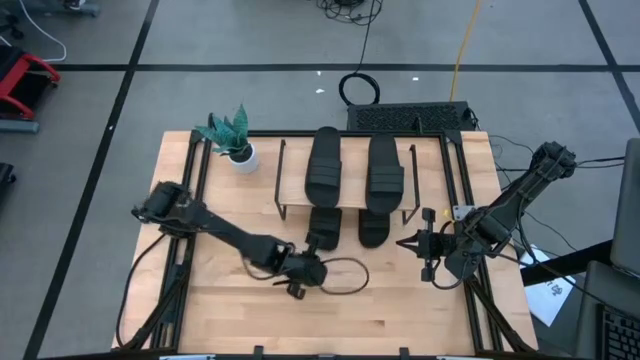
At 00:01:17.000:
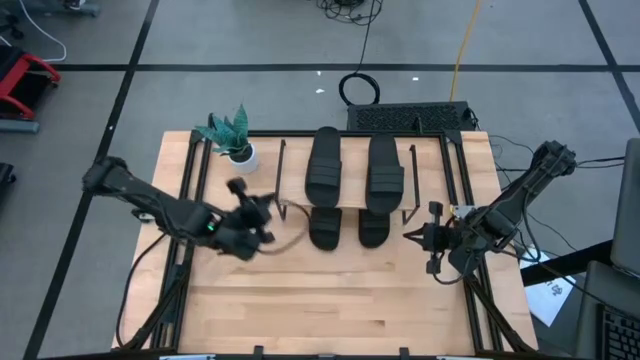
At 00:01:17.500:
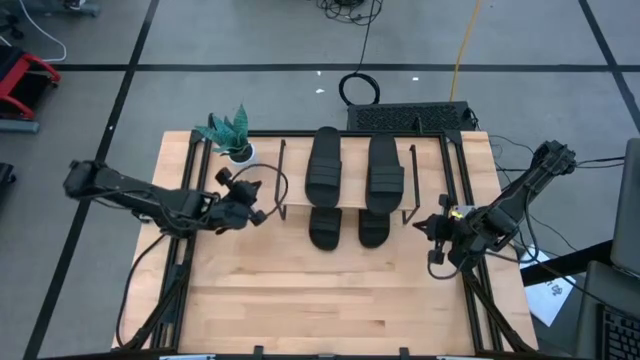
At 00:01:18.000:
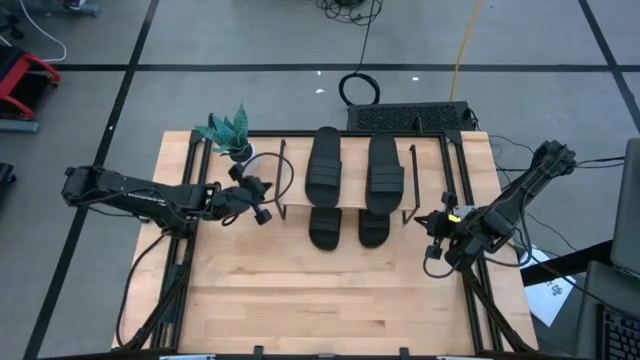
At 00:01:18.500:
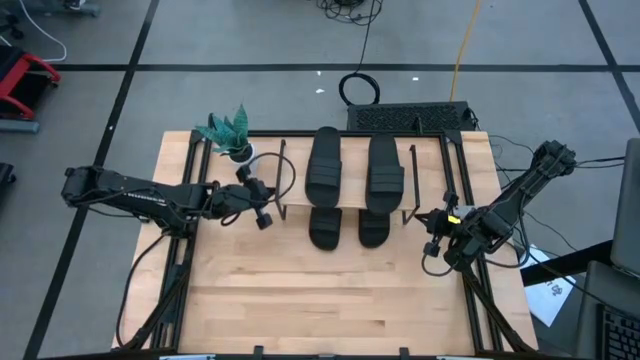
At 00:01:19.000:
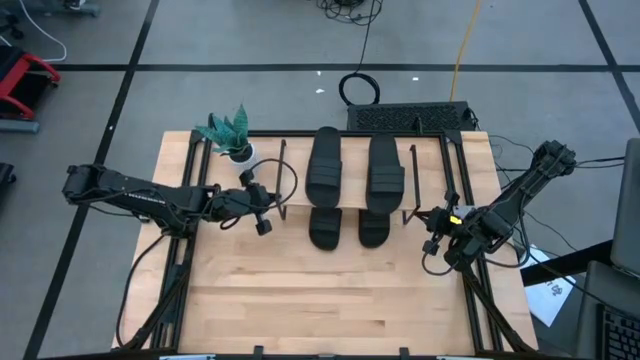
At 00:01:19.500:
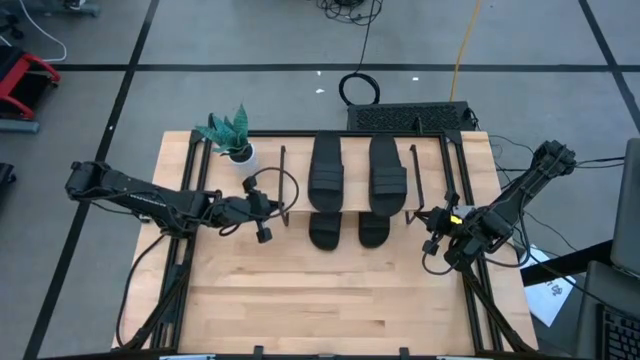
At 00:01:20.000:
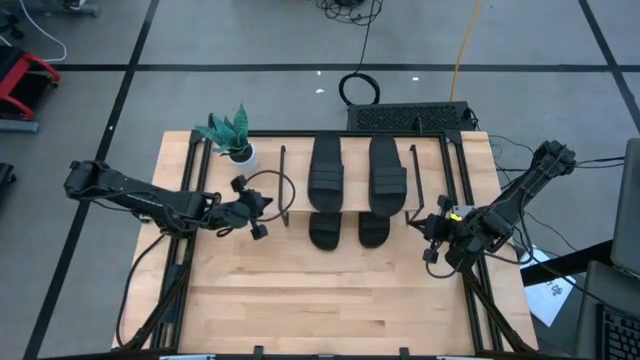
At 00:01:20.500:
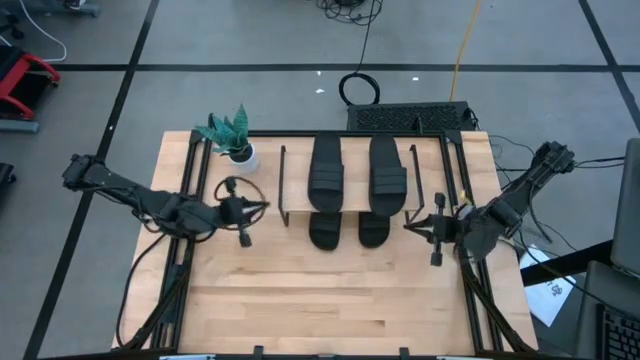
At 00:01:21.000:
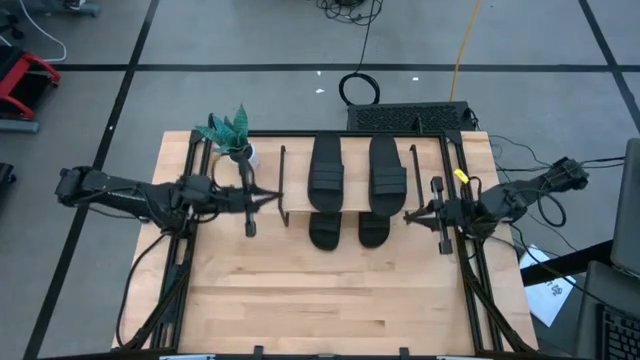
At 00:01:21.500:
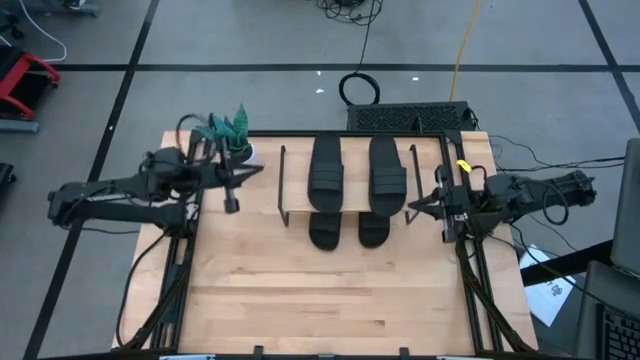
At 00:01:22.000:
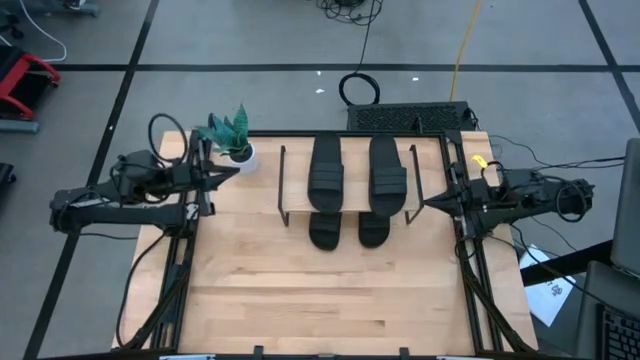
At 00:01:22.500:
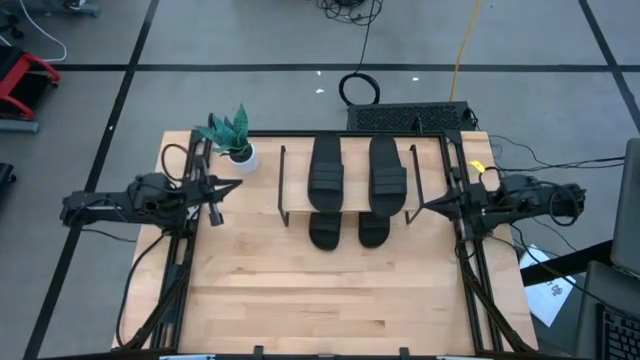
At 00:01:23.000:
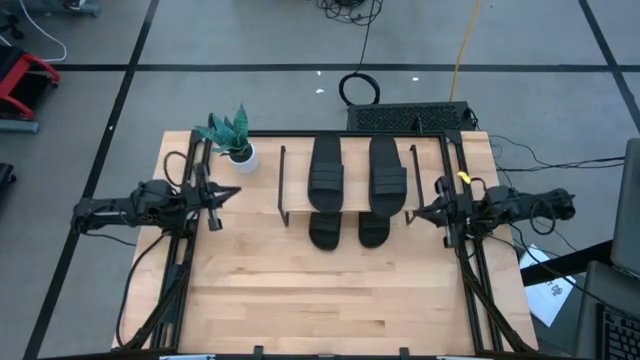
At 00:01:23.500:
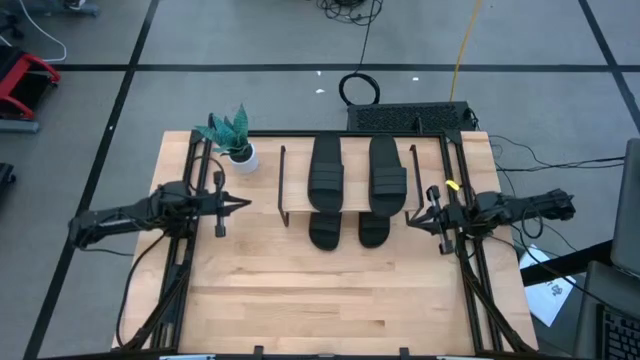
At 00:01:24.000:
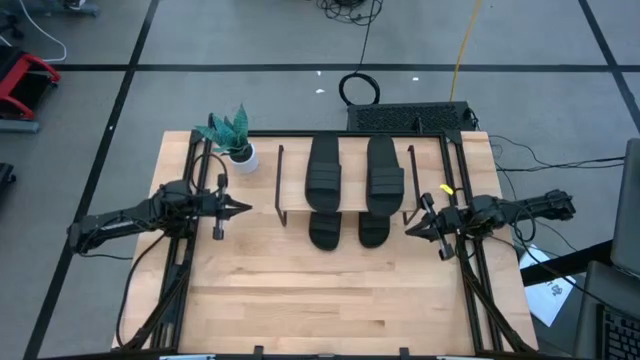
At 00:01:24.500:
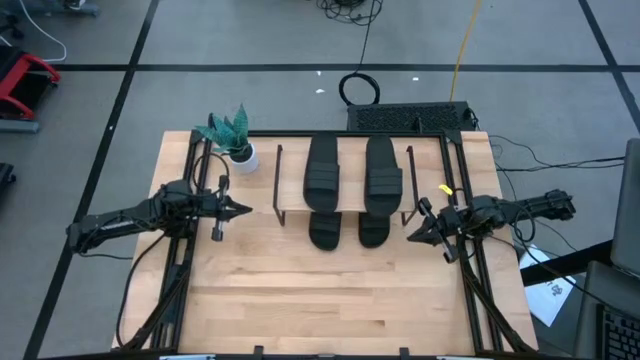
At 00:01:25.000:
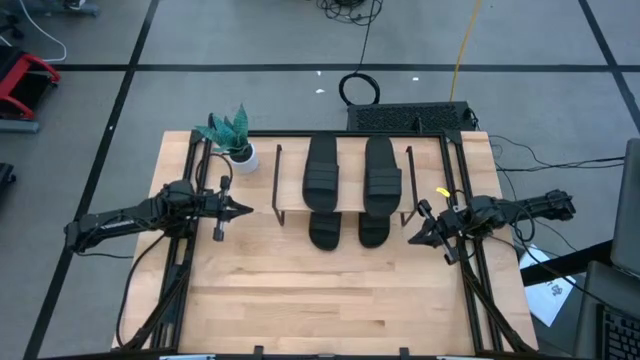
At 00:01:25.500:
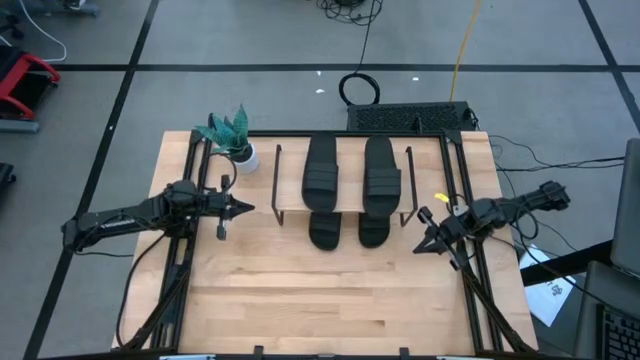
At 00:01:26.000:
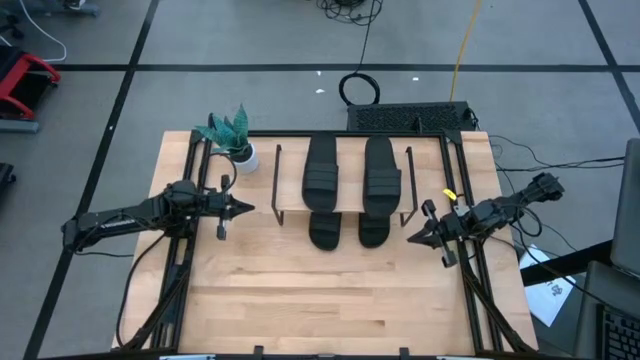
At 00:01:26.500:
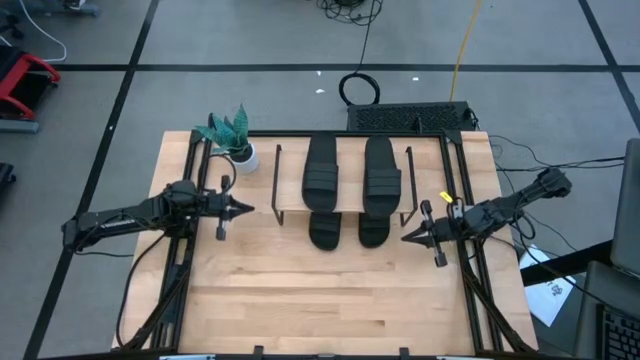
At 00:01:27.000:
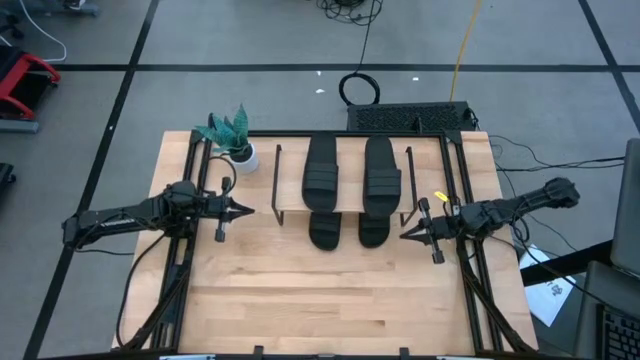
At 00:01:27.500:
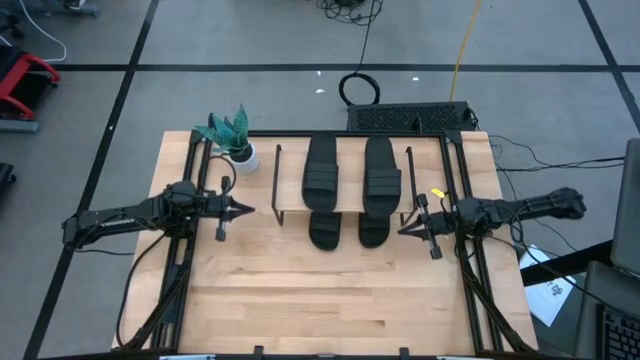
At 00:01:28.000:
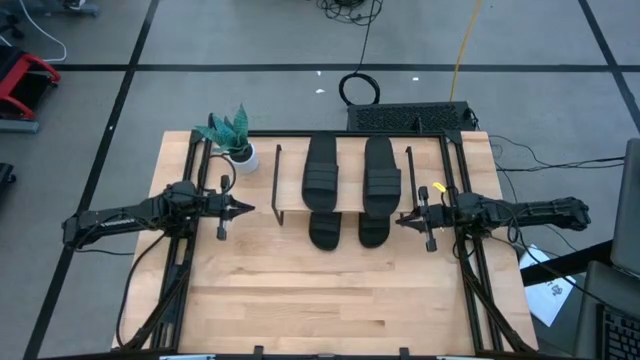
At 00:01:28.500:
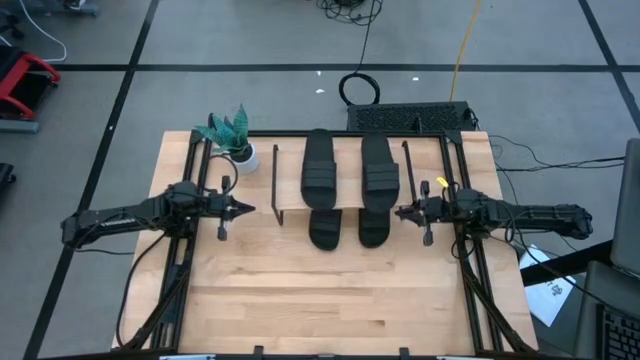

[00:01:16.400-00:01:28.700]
Task: Pick and place slides into the shelf
Adjust the shelf

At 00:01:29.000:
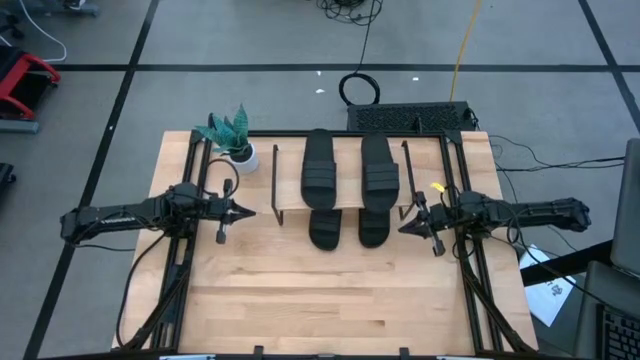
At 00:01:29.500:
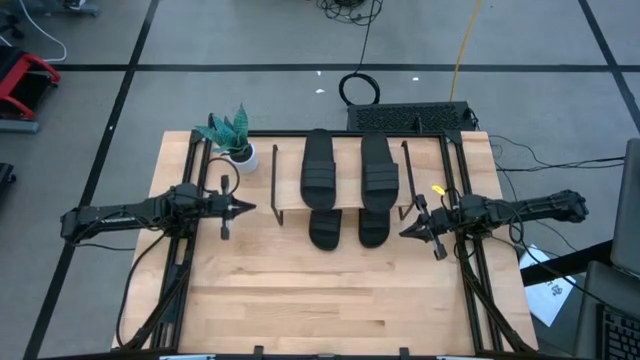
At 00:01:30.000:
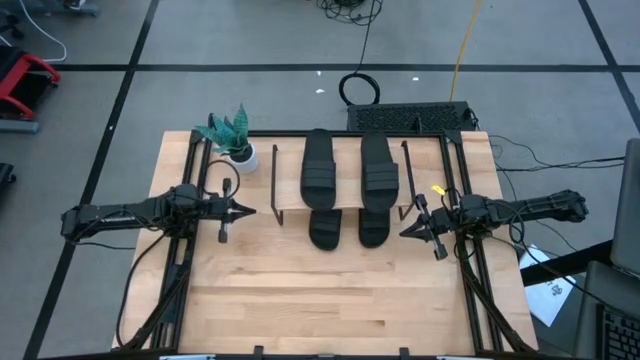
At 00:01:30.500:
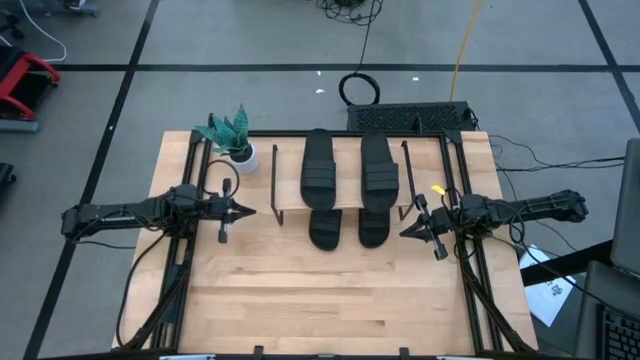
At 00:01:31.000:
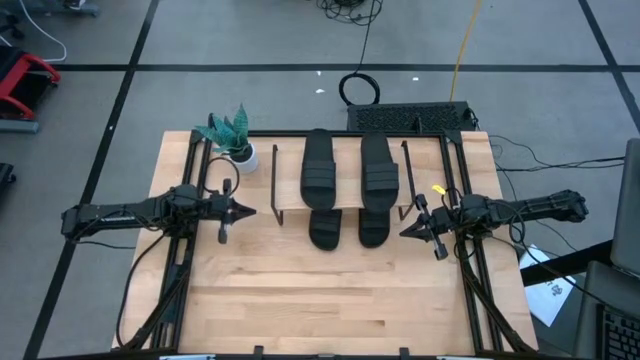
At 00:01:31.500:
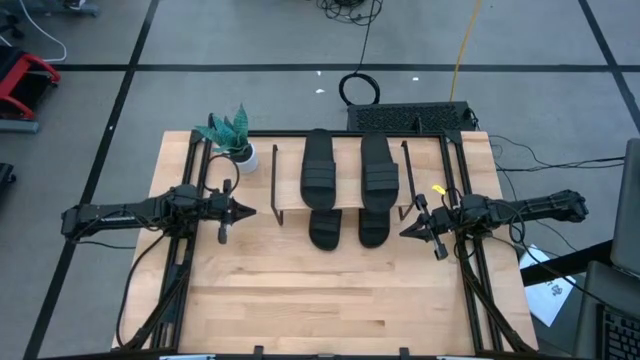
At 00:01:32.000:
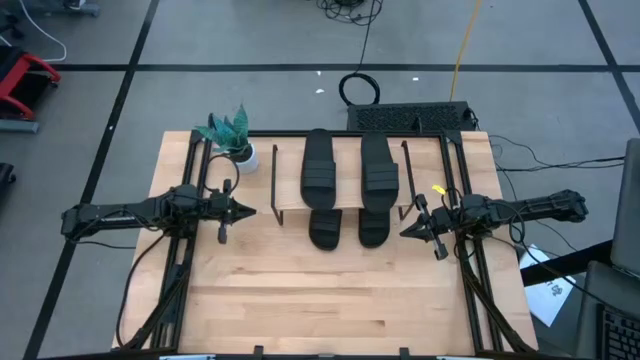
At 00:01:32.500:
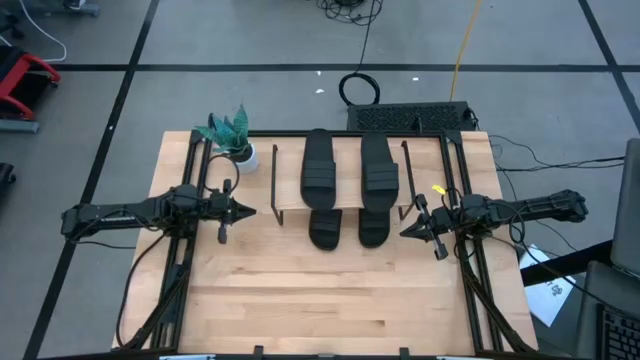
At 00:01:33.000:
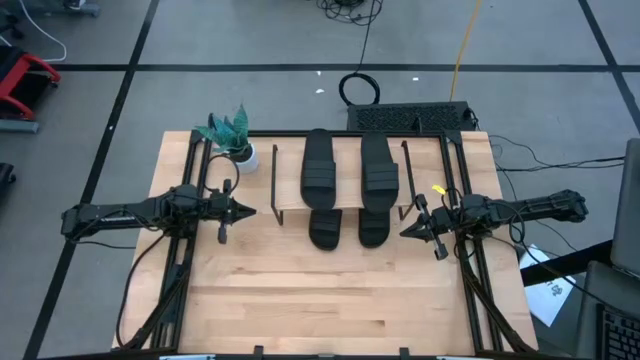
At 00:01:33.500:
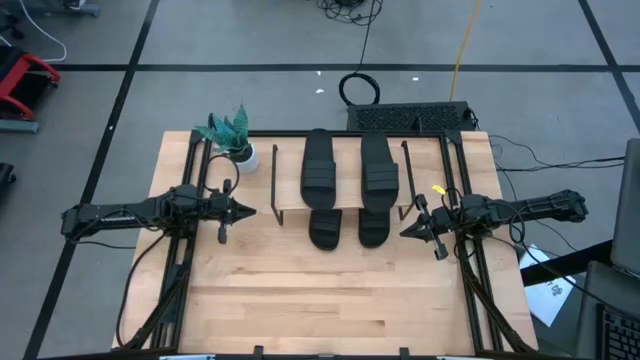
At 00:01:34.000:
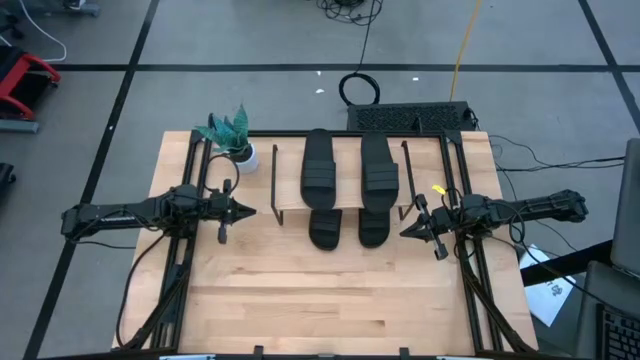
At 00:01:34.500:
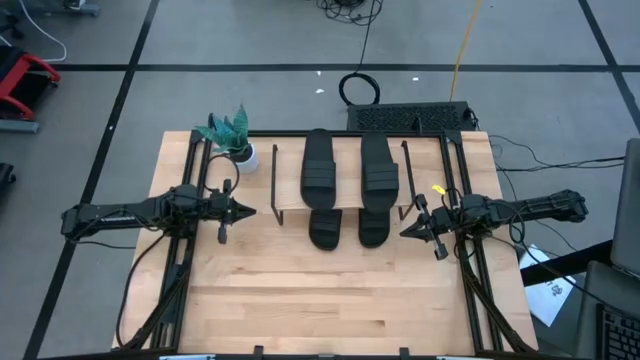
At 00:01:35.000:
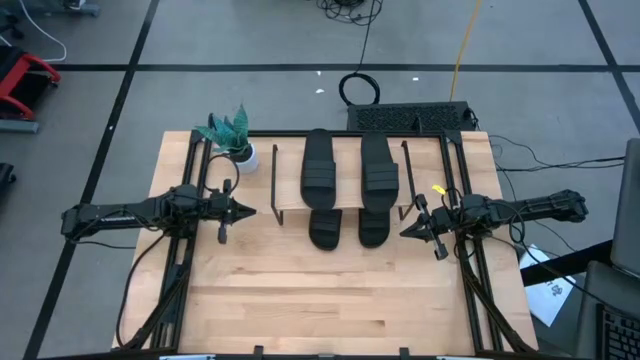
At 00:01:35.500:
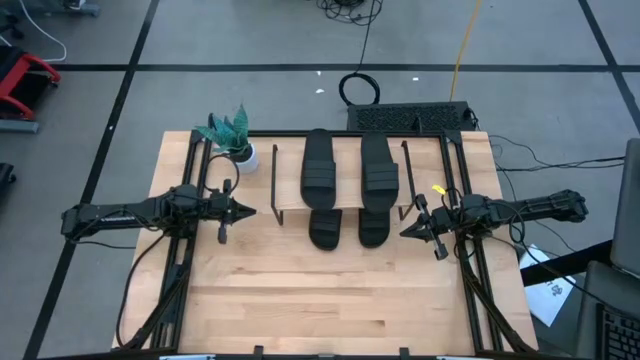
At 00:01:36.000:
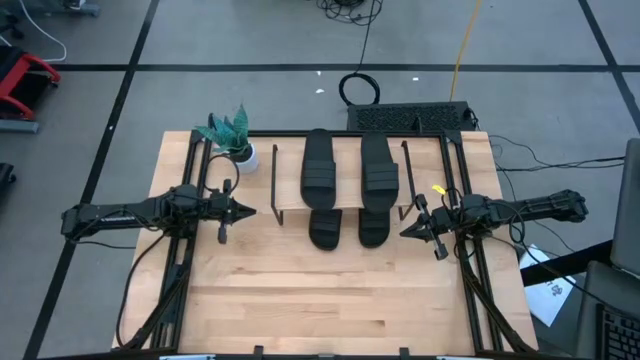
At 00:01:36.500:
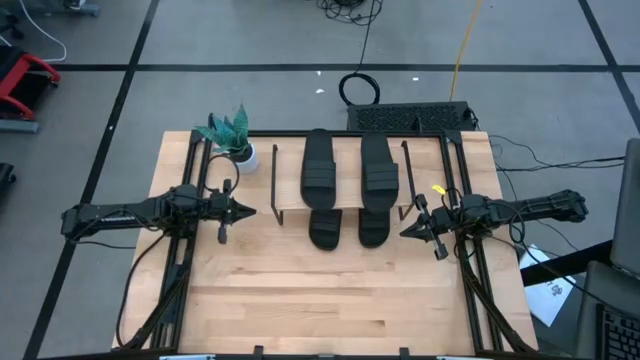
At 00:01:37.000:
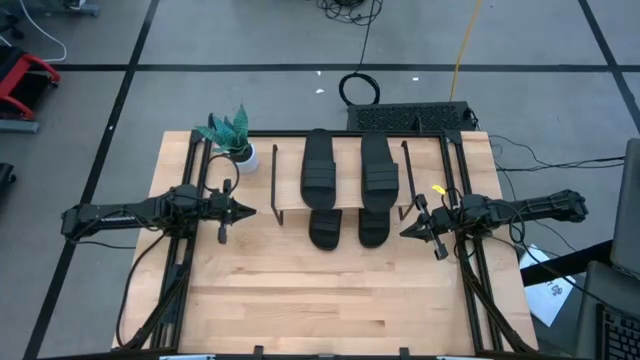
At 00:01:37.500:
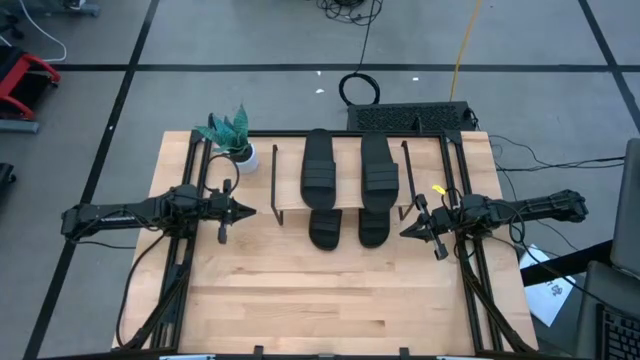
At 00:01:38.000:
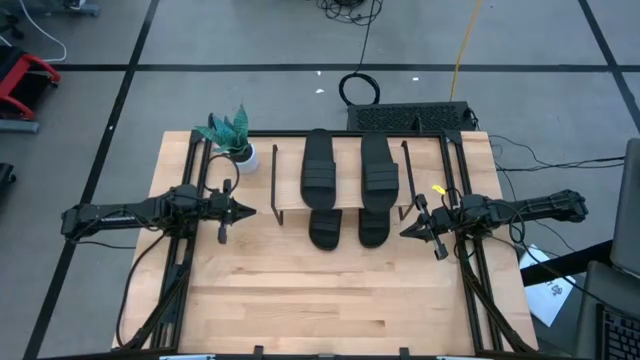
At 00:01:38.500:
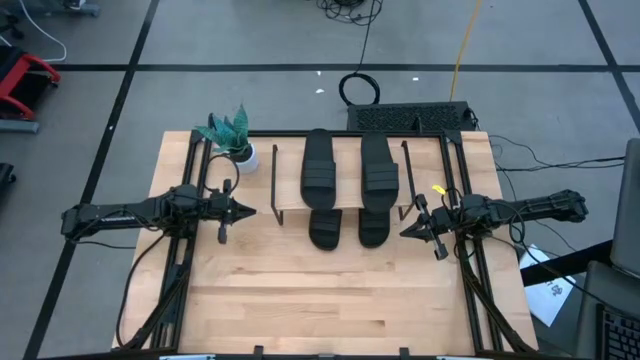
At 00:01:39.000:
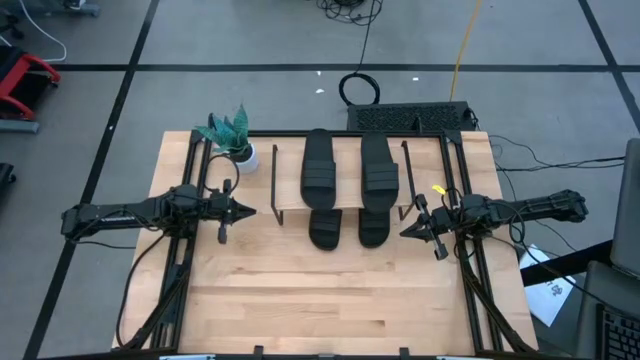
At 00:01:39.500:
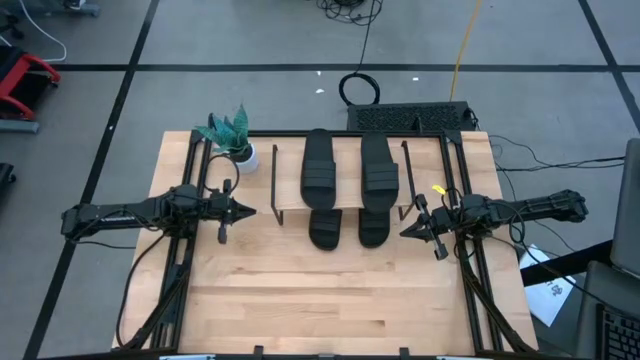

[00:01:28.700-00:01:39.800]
Return to Home Position
